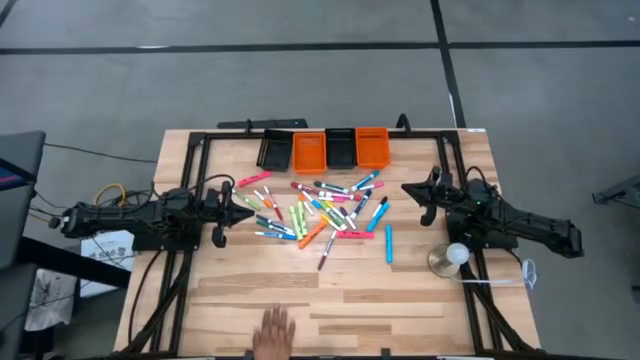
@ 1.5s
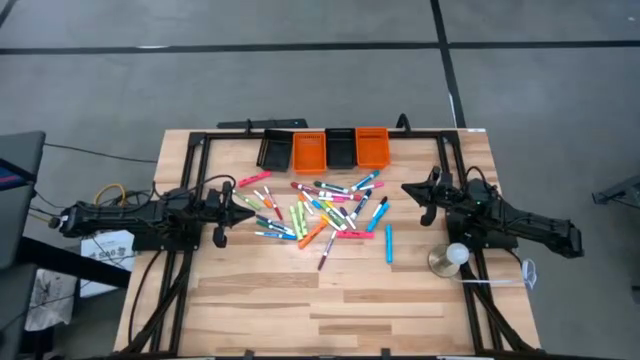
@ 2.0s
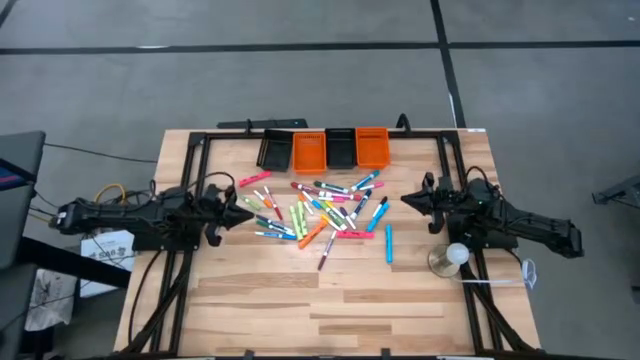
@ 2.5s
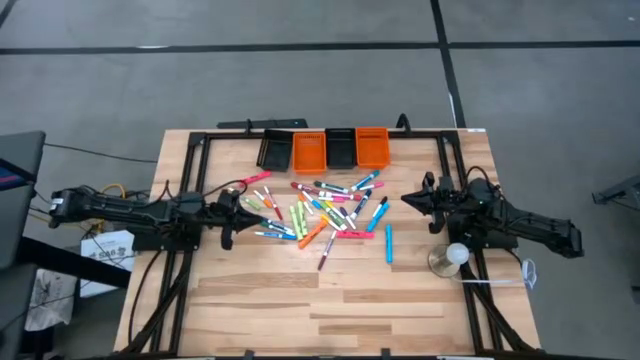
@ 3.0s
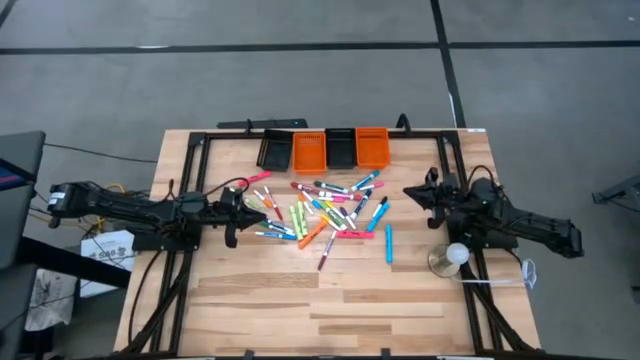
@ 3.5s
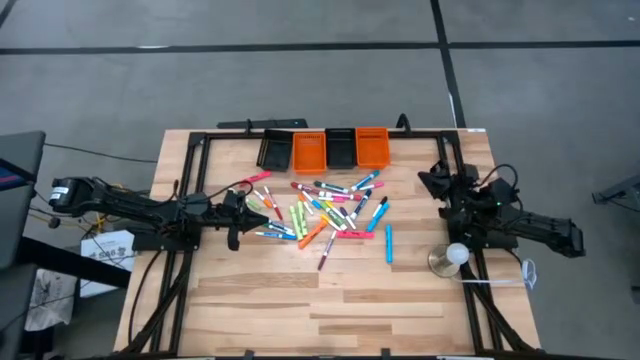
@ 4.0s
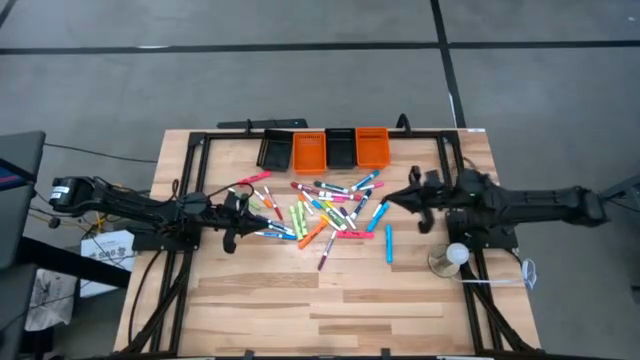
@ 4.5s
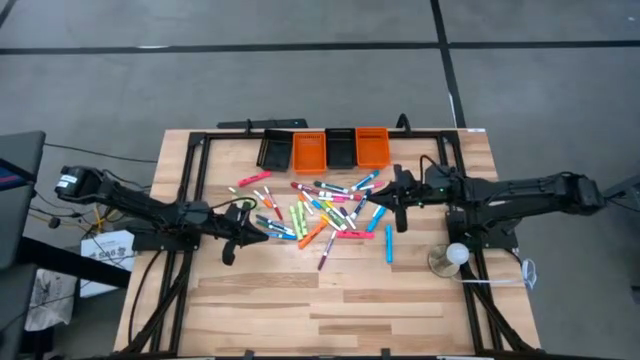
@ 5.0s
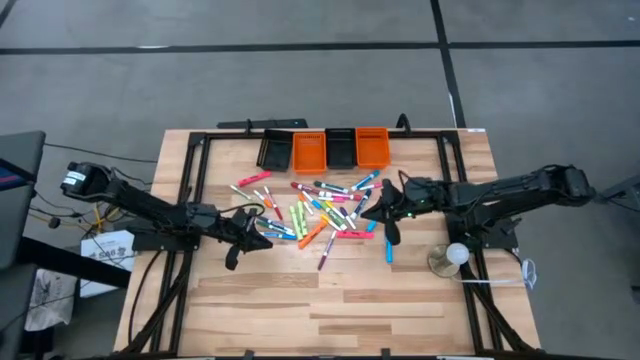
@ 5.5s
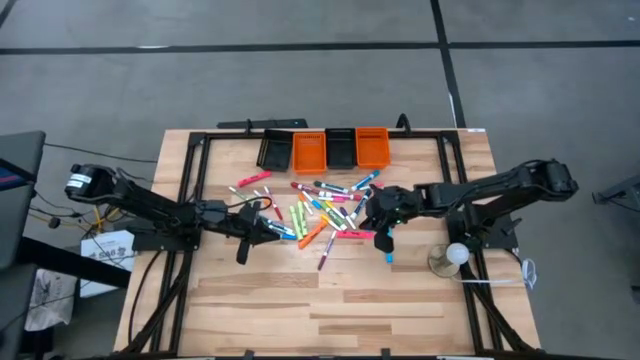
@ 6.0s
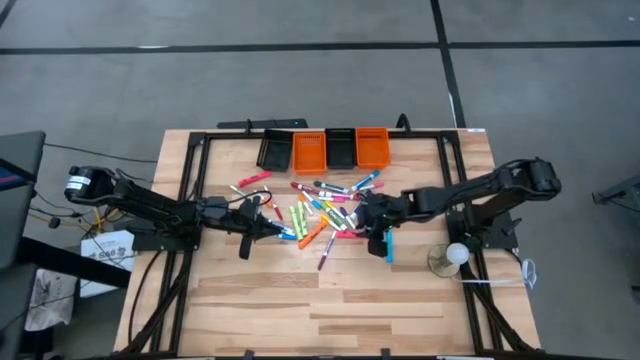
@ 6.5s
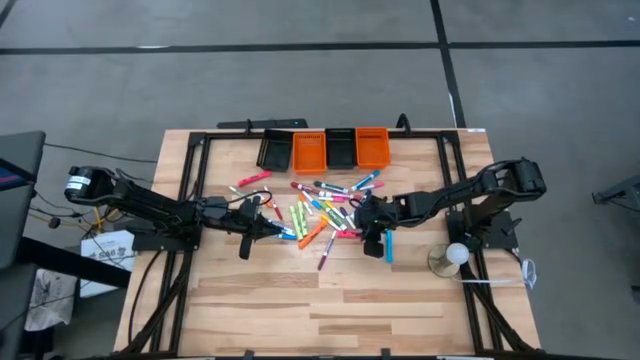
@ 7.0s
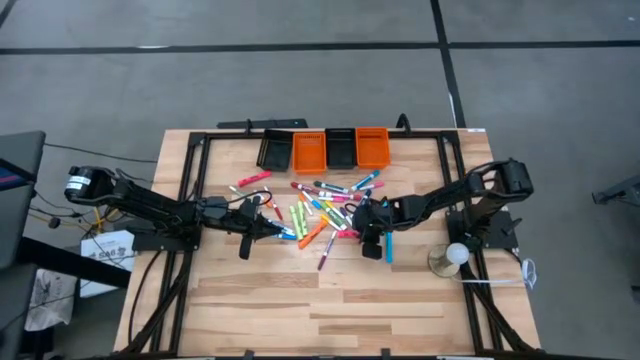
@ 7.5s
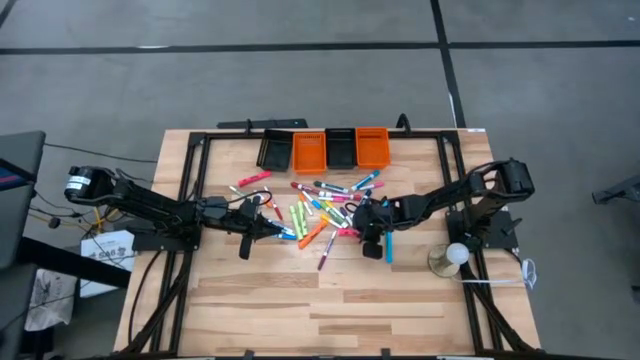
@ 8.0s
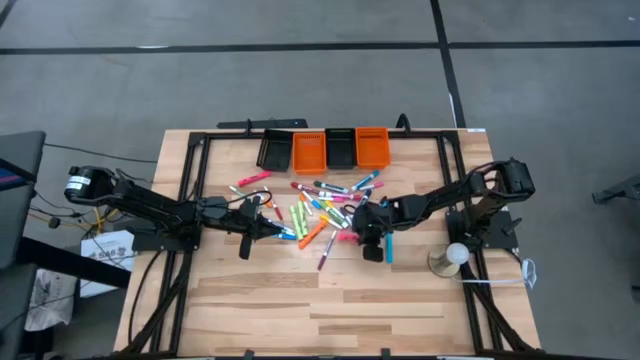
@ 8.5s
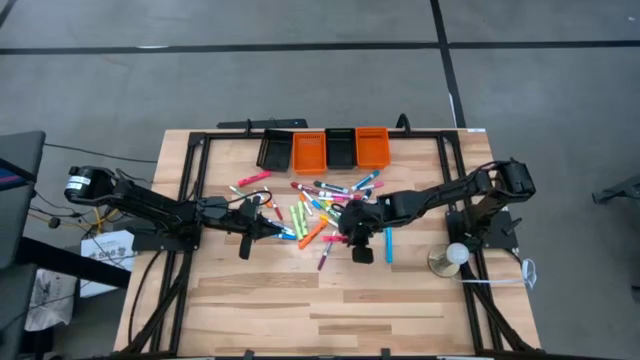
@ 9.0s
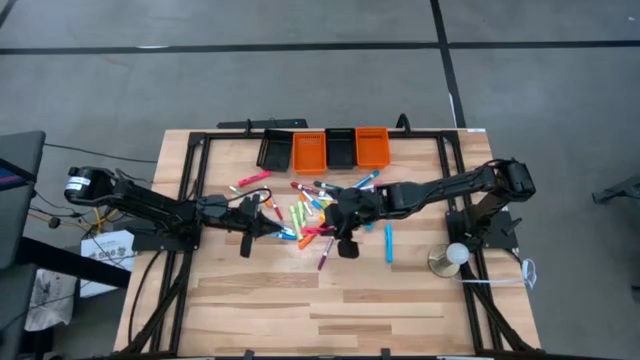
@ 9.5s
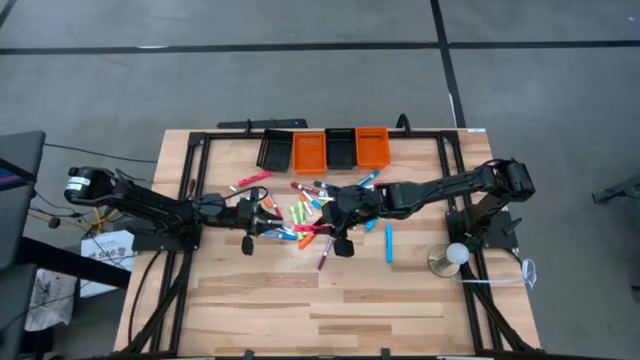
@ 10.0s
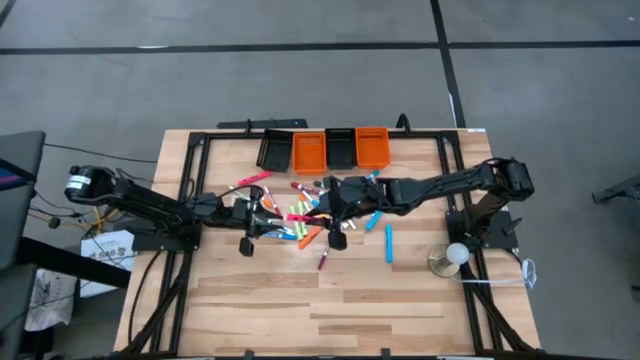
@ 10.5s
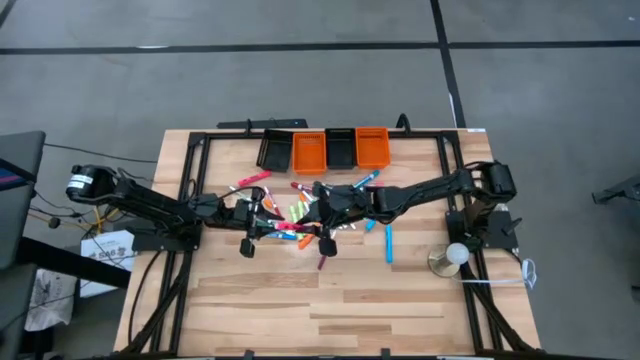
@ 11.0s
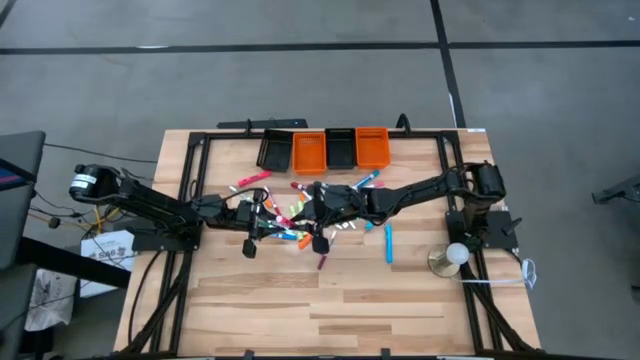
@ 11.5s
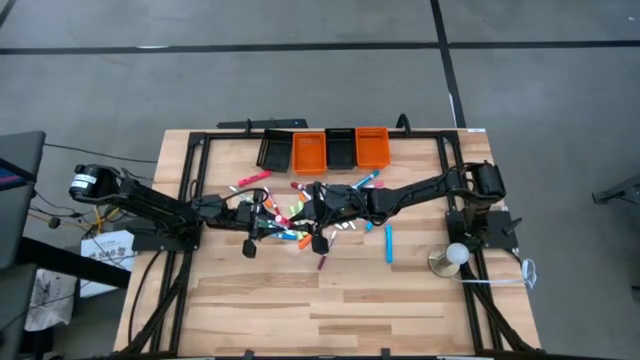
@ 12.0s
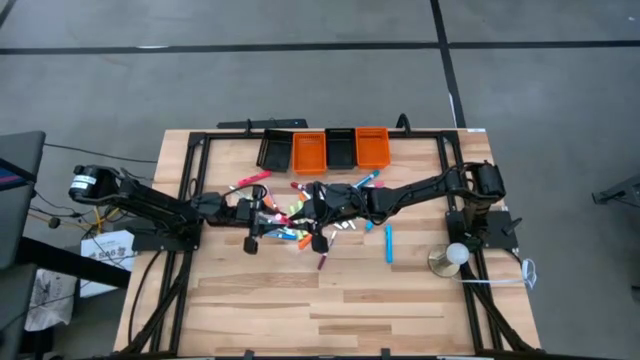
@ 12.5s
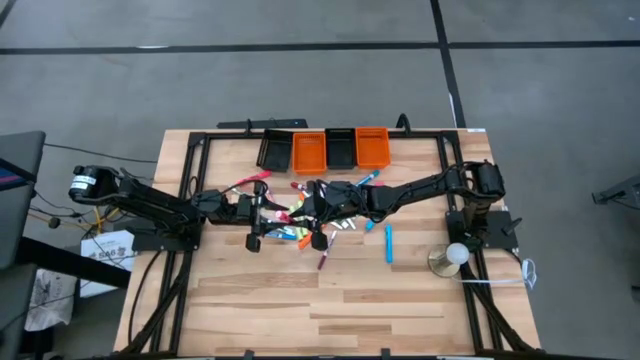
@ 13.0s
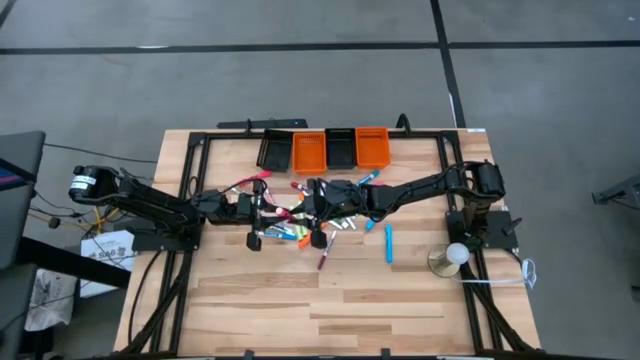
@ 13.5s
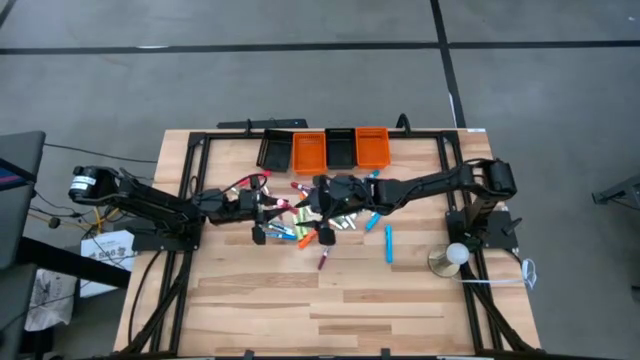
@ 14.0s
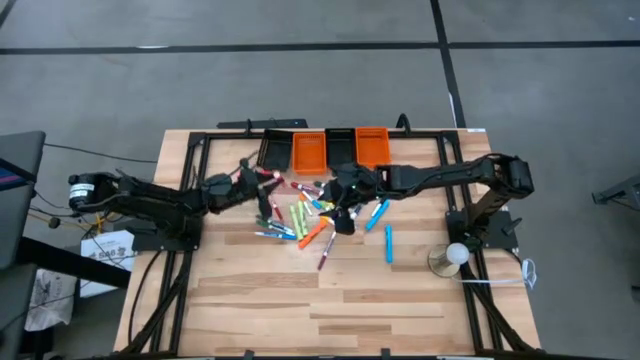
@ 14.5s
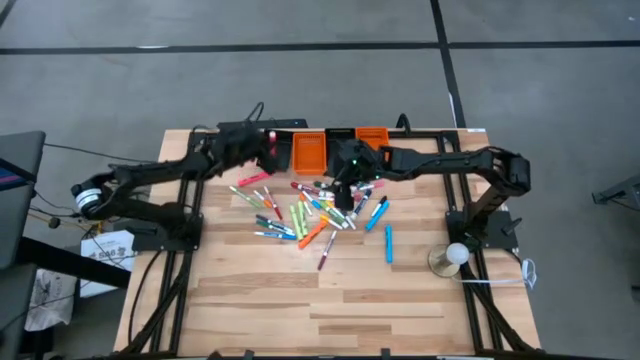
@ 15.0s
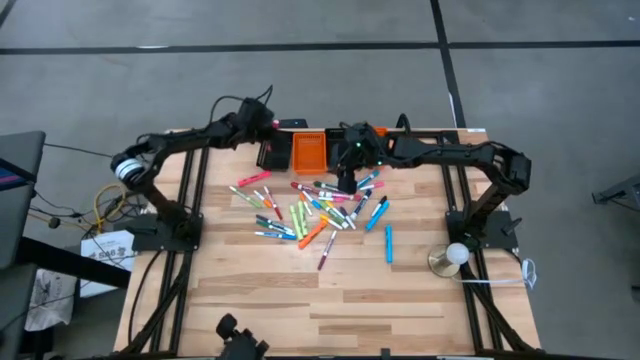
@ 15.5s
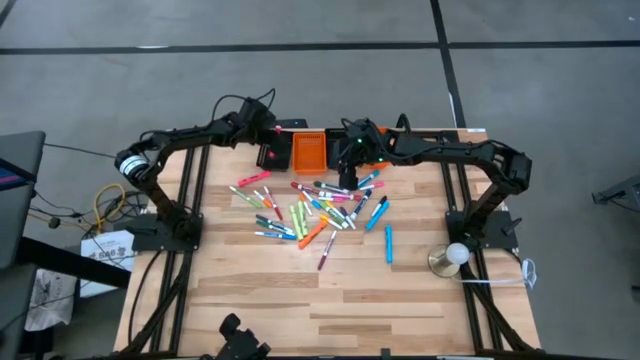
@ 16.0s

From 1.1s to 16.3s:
Task: Pick & Place Markers
Put the right big pink highlighter pen into the left black basket

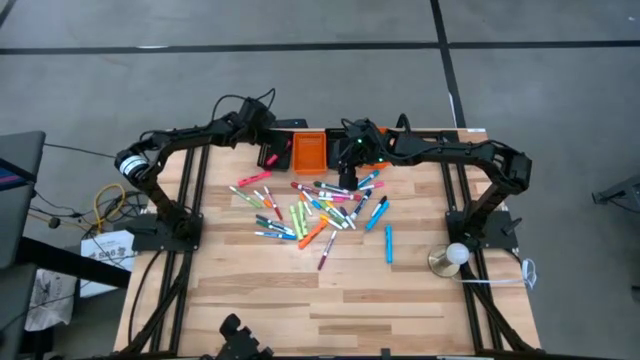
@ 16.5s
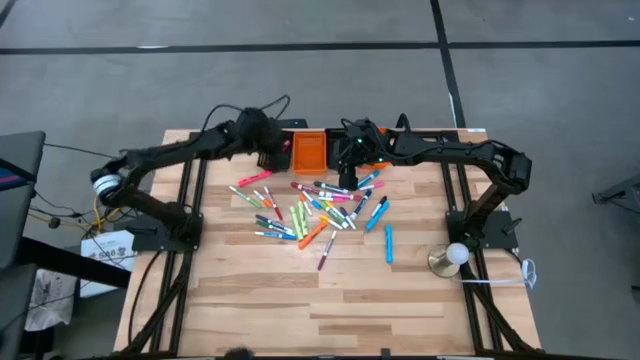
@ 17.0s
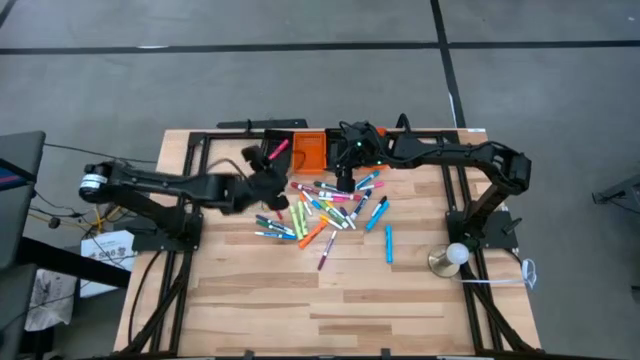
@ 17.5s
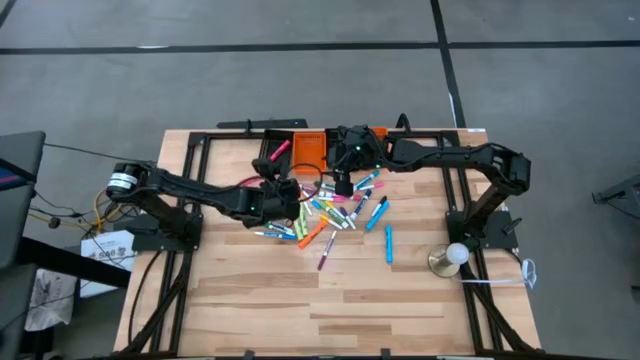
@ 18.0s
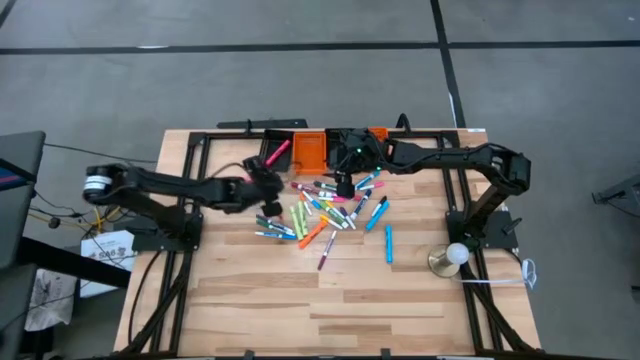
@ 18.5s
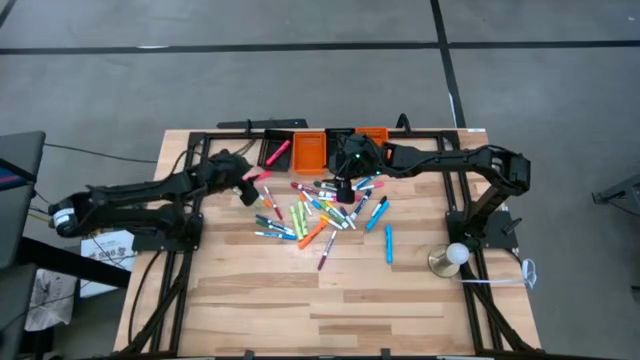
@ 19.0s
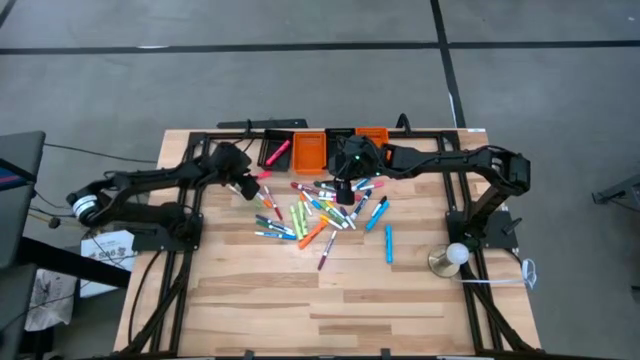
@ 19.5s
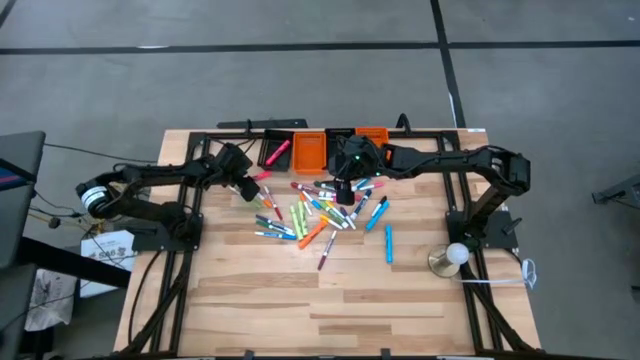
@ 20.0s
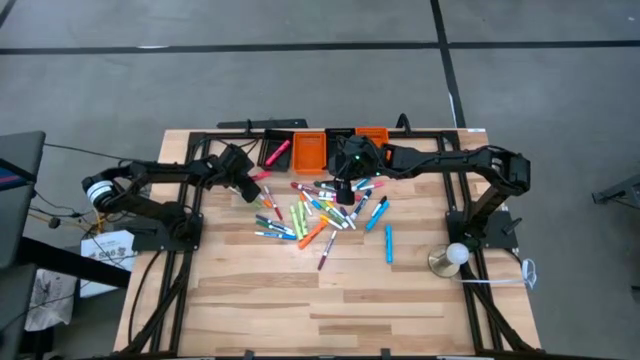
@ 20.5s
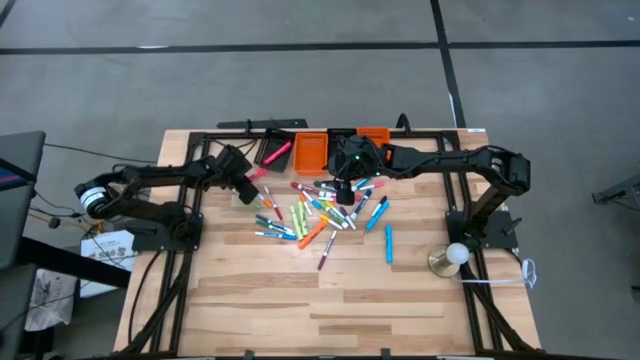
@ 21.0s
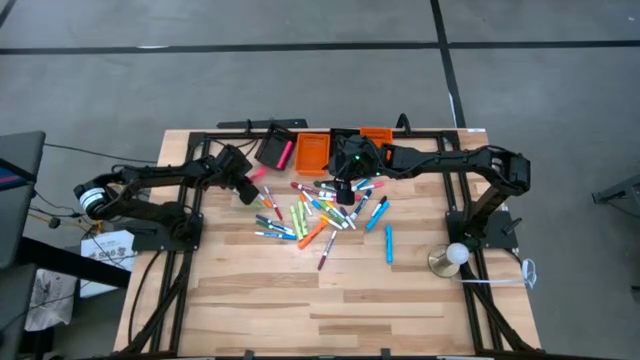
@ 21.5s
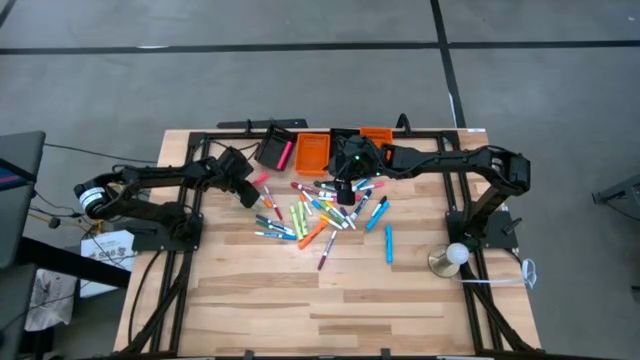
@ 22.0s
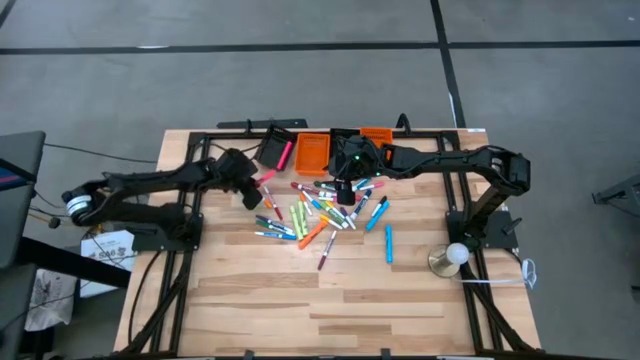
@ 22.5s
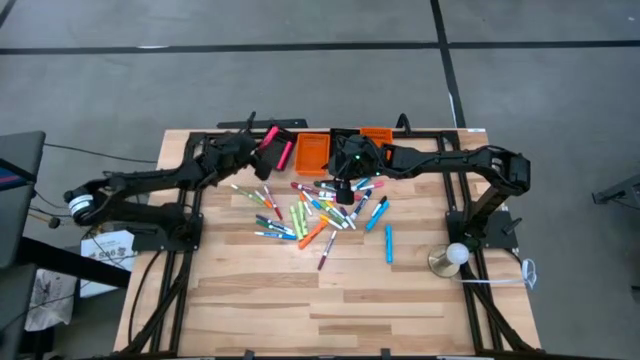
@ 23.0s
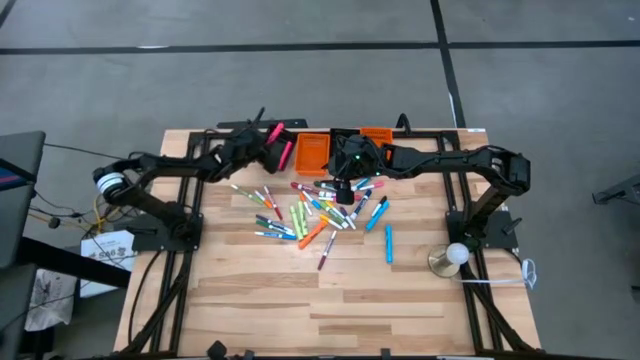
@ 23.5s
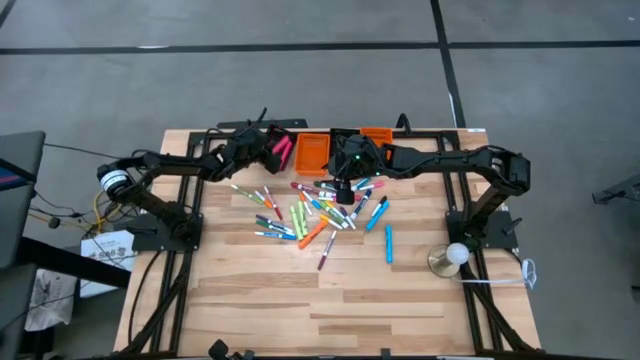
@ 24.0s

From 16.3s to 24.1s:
Put the big pink highlighter pen into the left black basket
